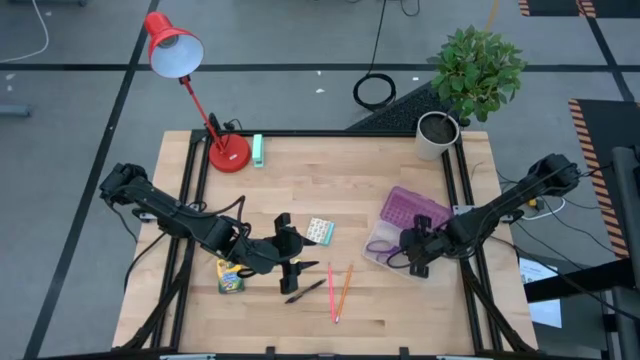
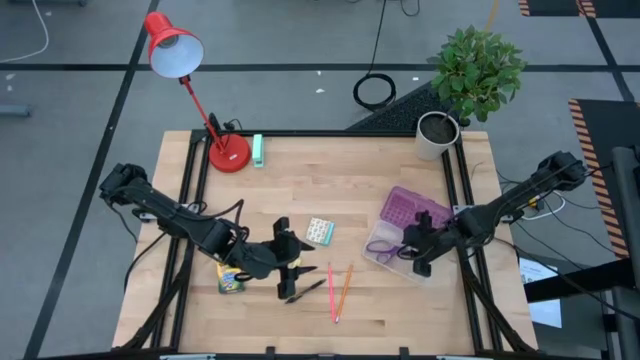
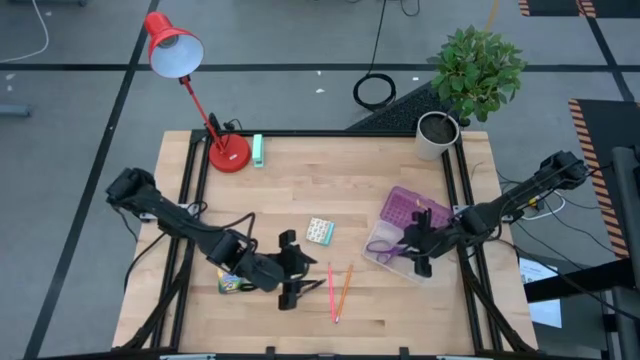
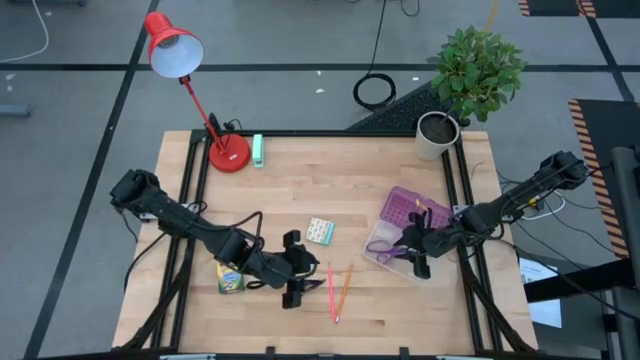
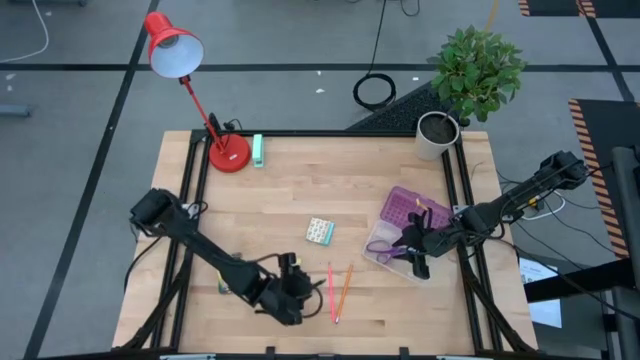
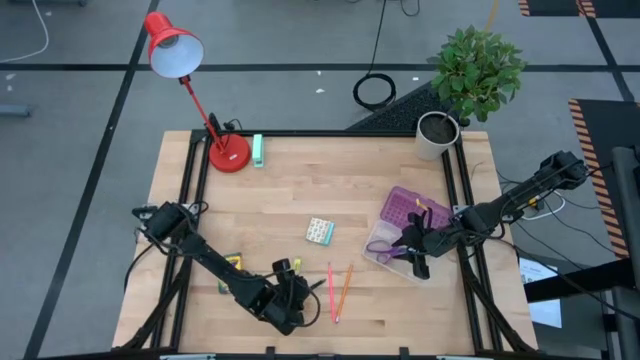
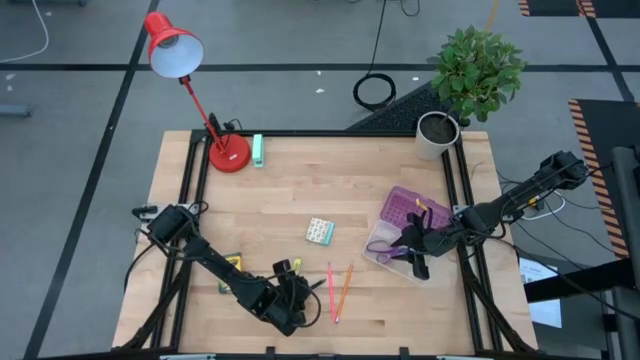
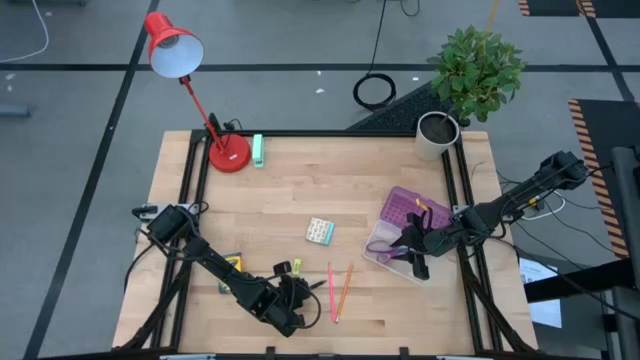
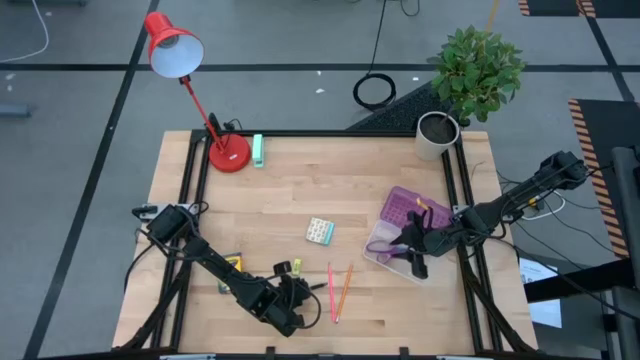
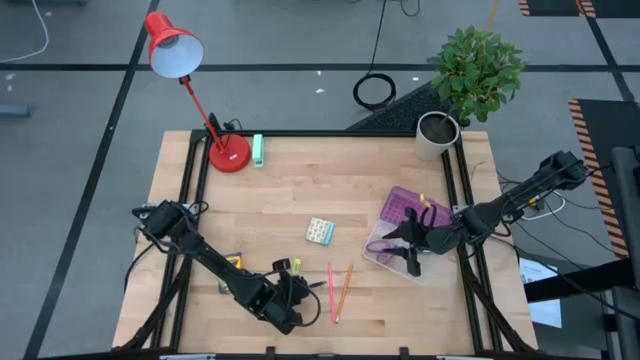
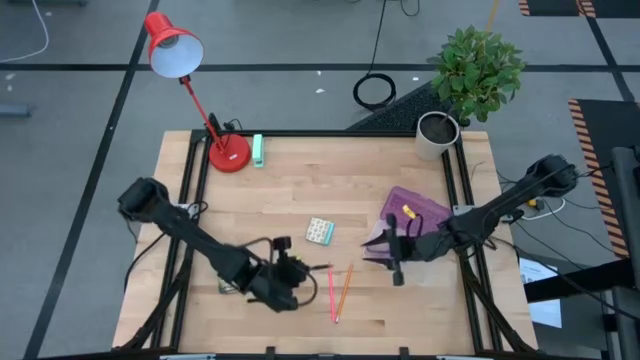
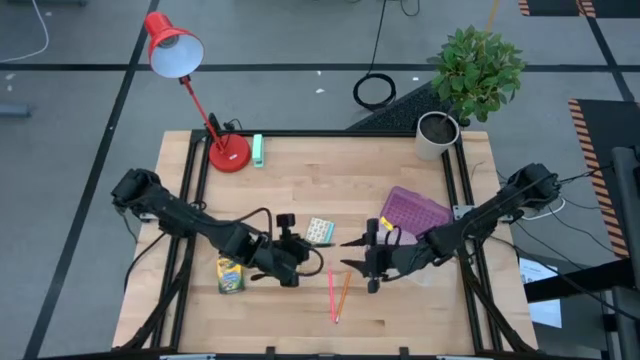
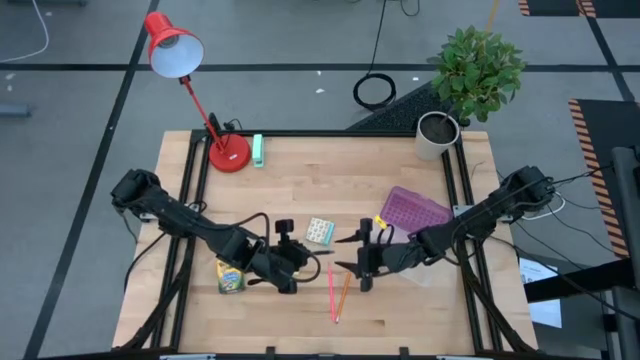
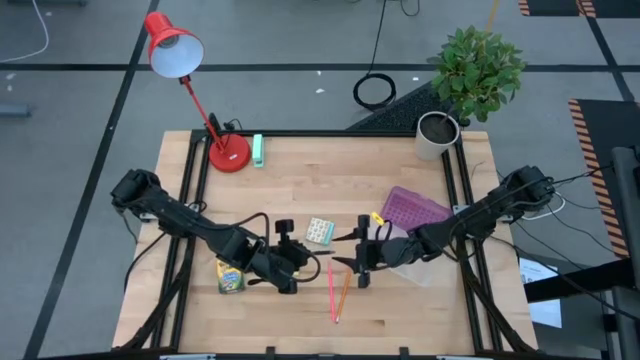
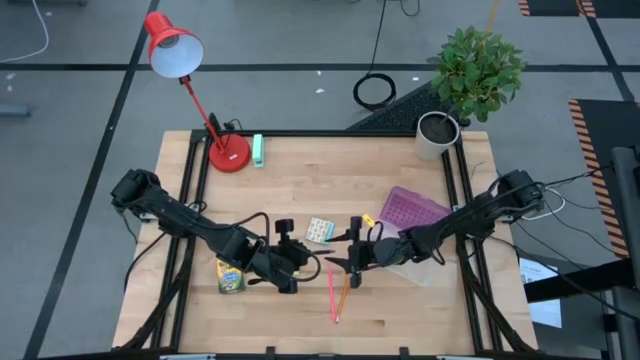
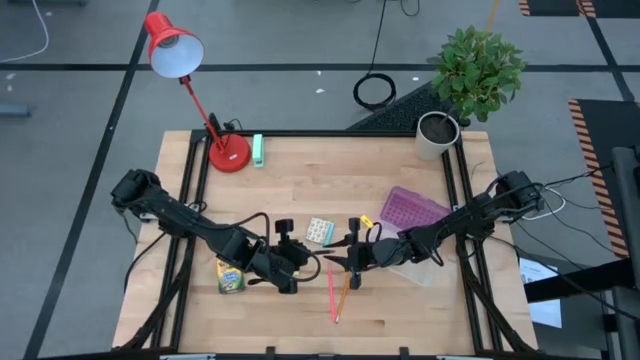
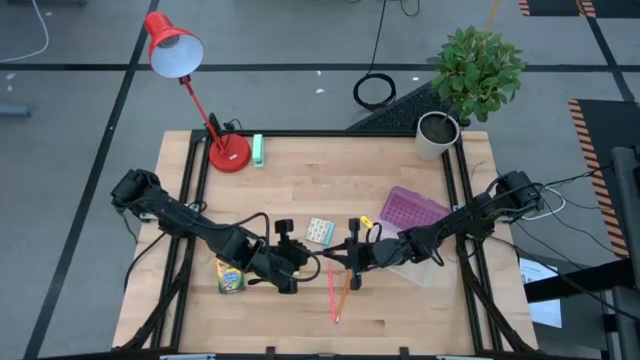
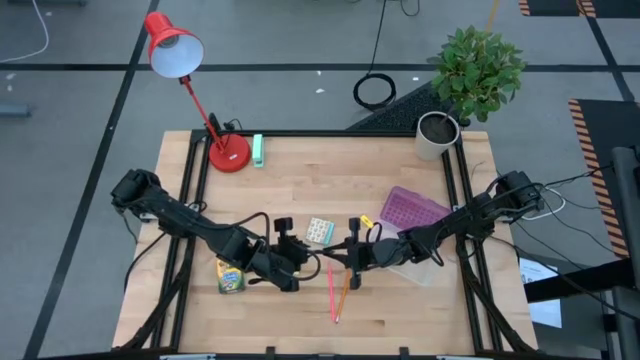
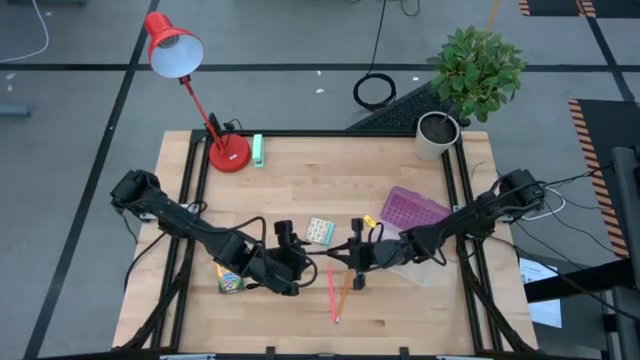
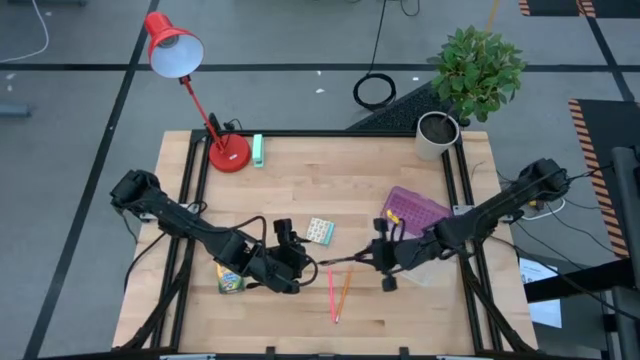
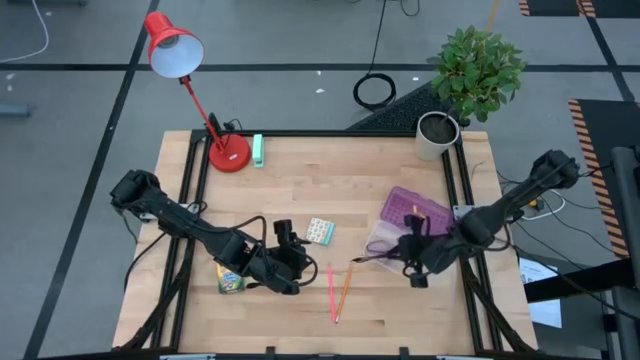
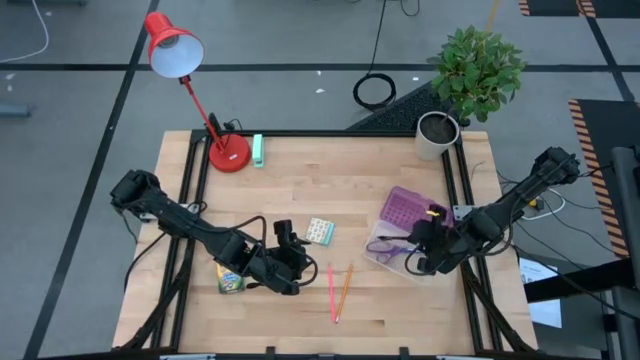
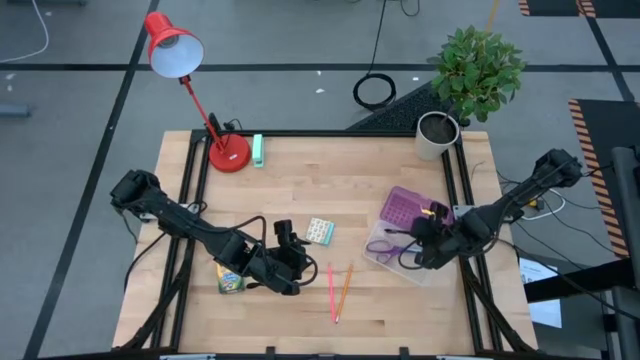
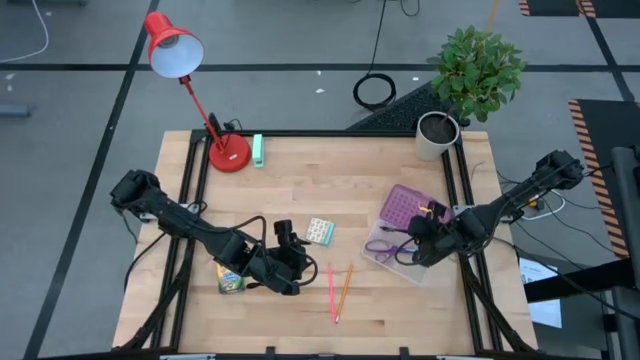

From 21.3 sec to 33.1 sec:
Task: Pack school essentials
Put the pen into the supply box

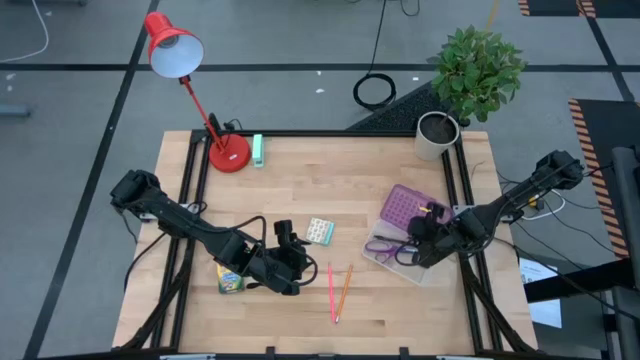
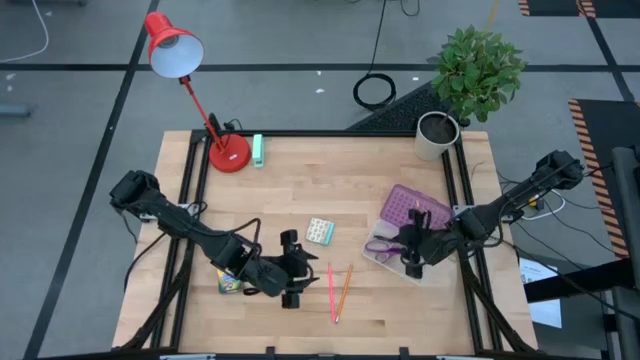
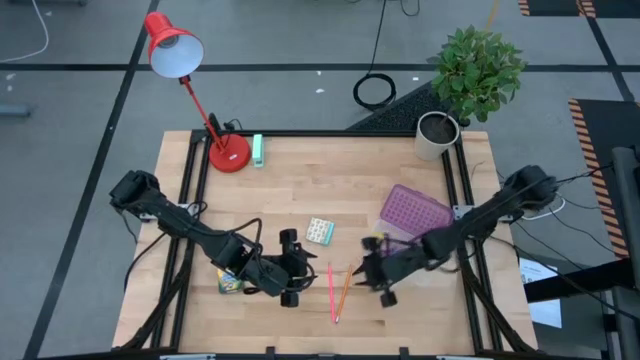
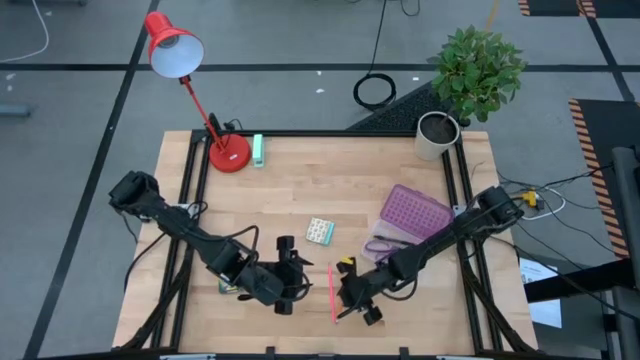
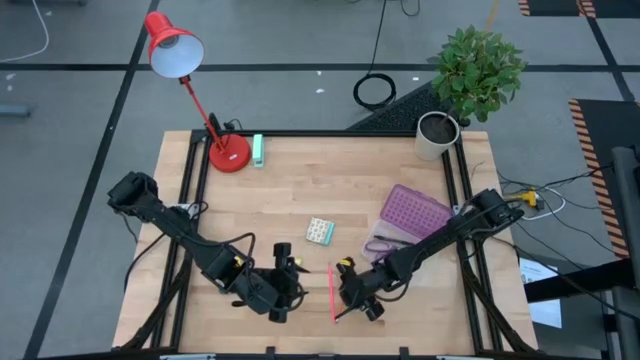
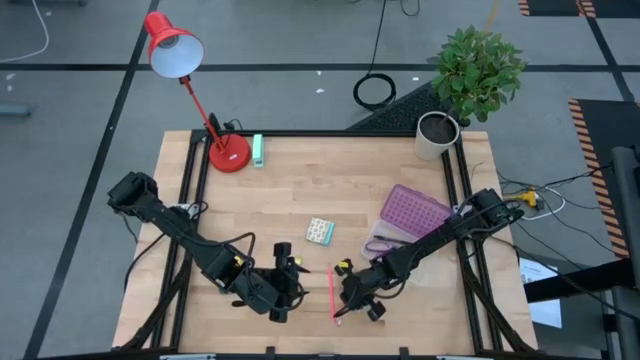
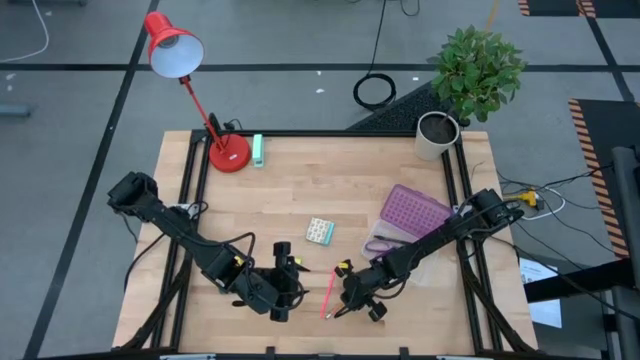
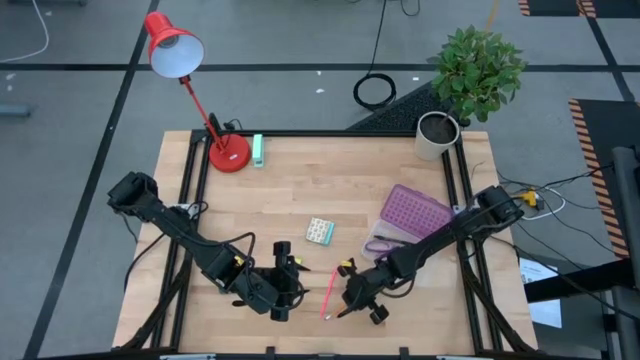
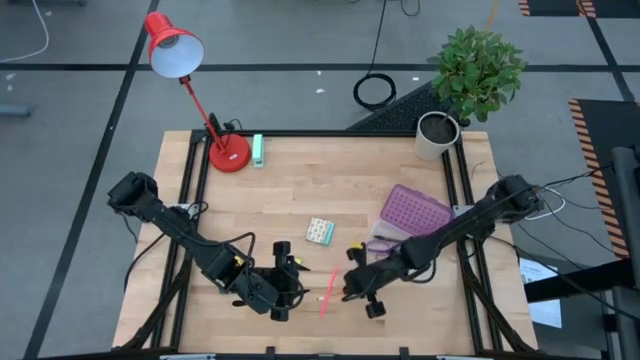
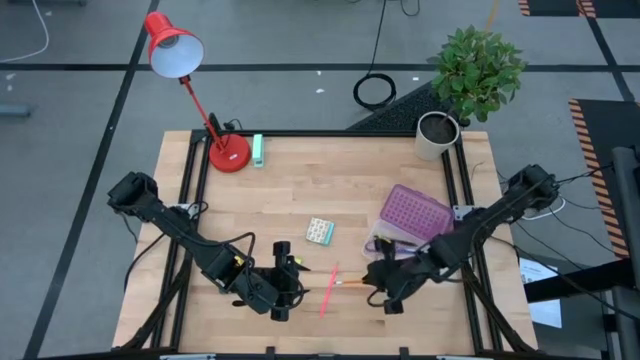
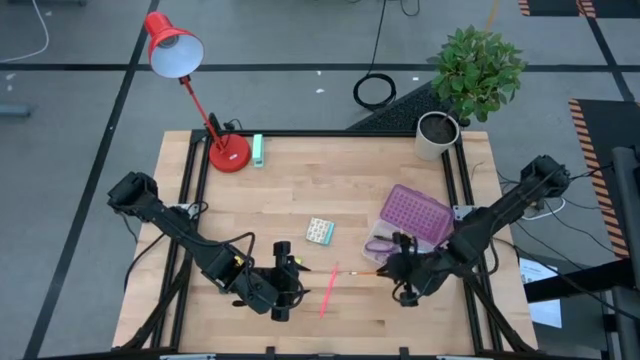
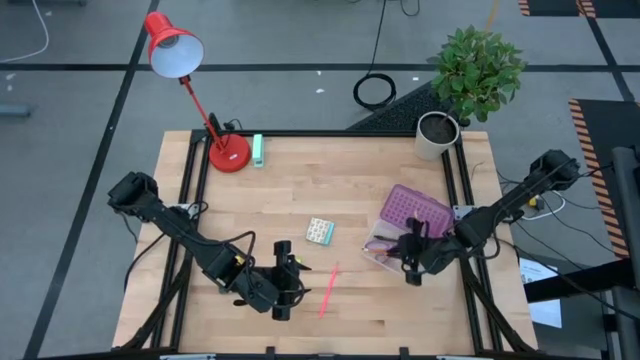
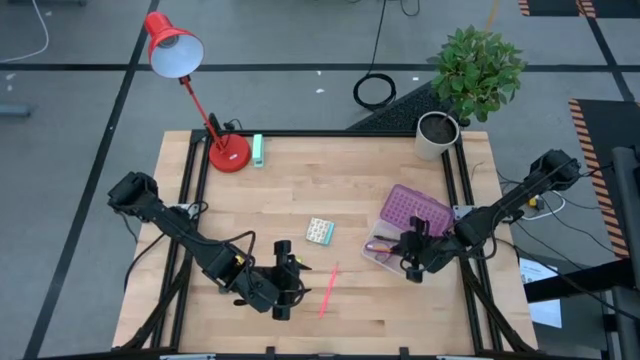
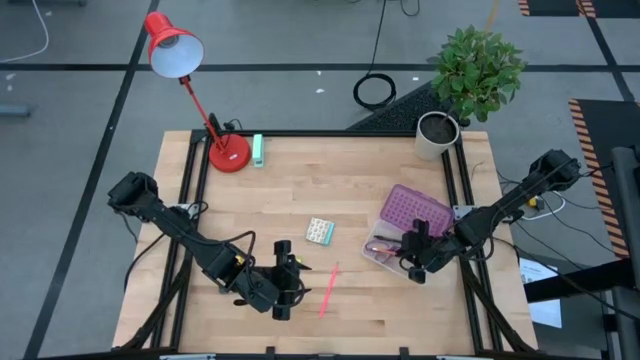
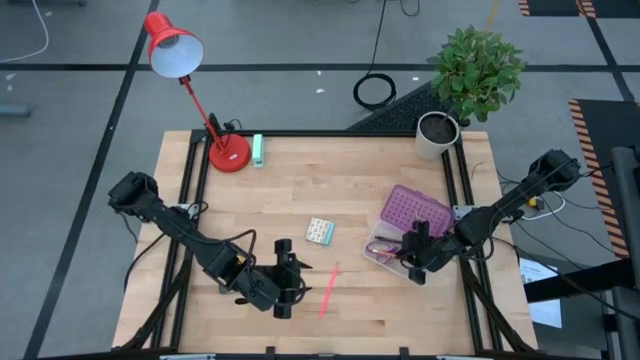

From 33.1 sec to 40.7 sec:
Put the pencil into the supply box

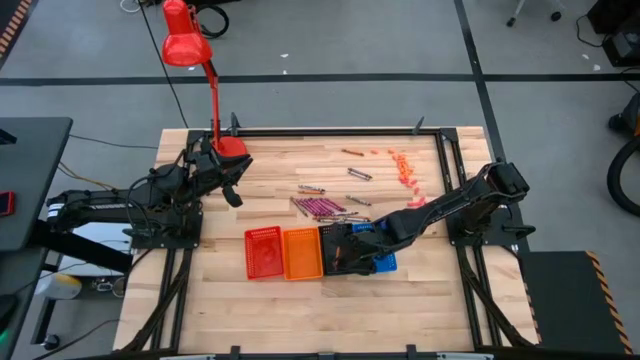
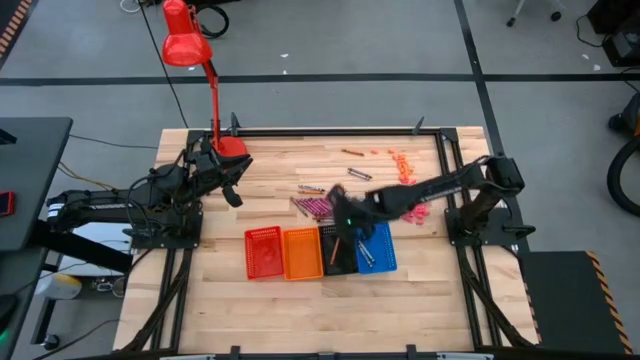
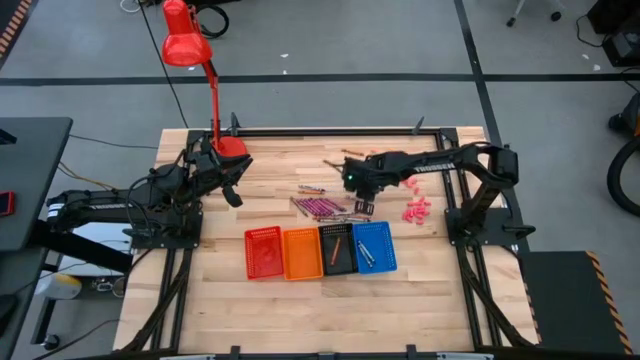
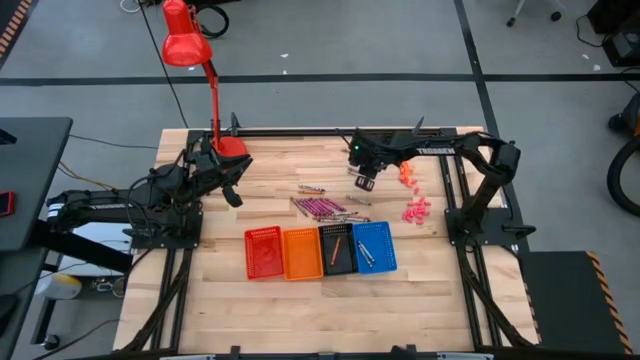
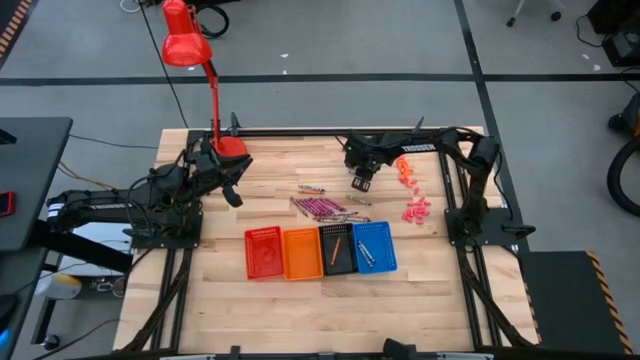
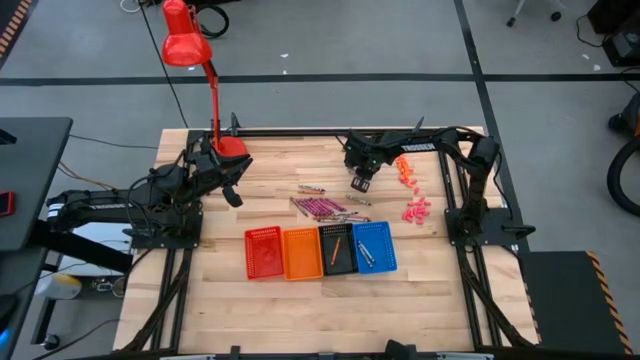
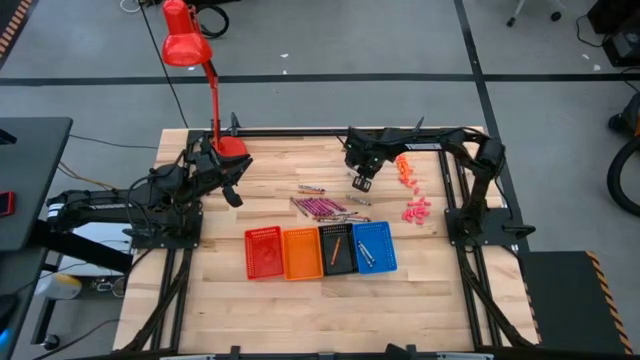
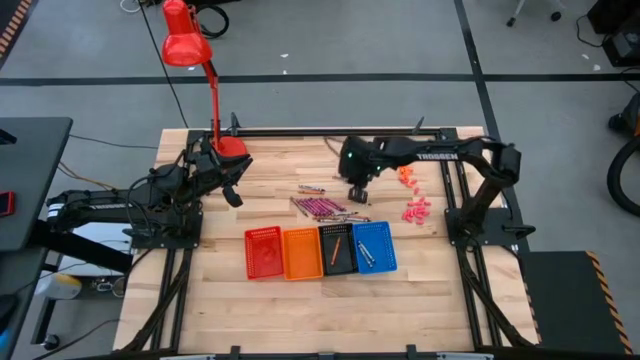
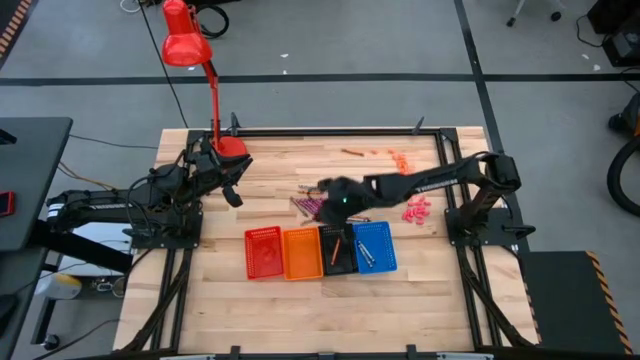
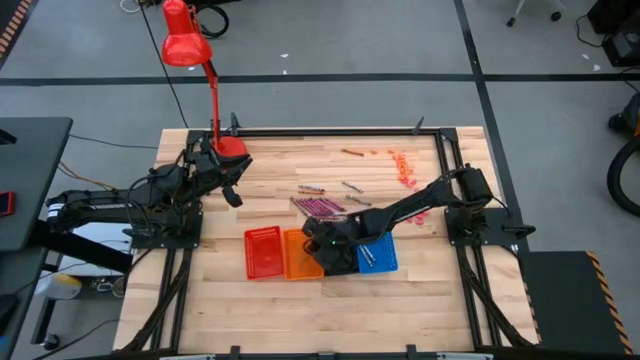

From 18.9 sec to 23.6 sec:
Task: Sort crayons
Put the brown crayon into the orange bin
